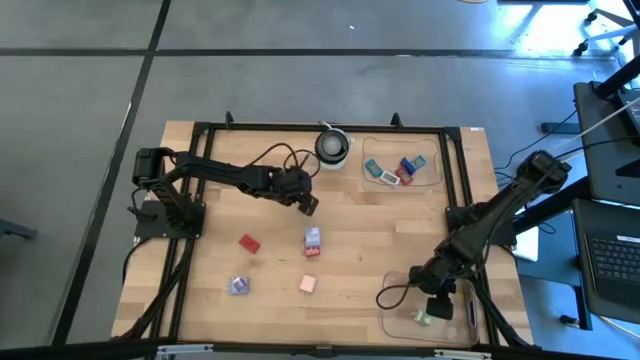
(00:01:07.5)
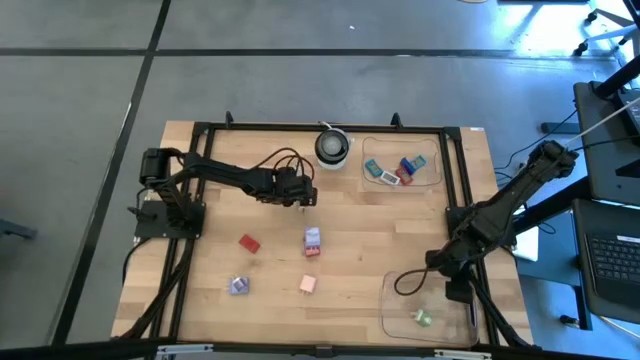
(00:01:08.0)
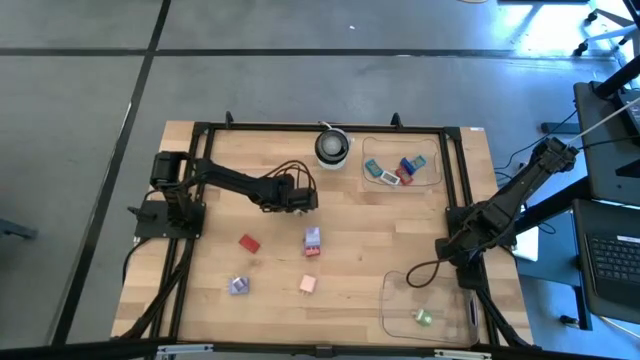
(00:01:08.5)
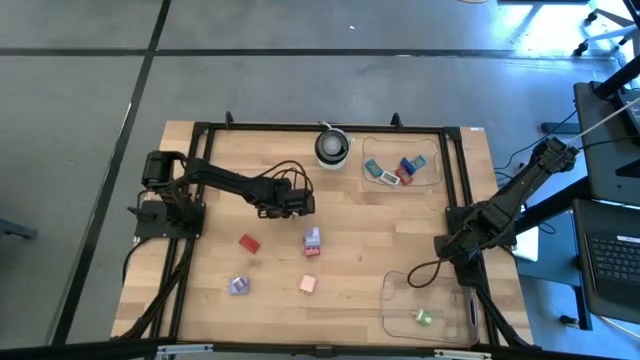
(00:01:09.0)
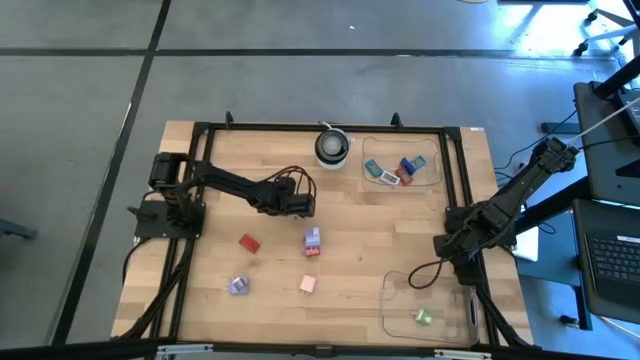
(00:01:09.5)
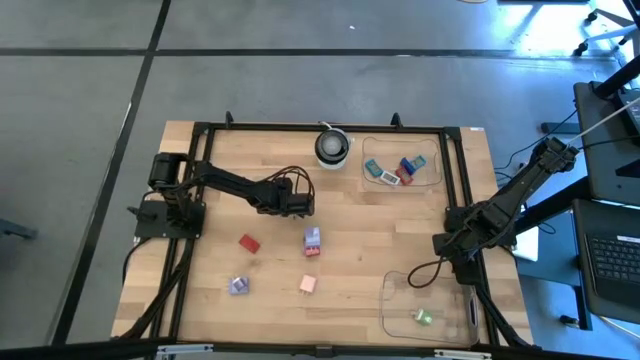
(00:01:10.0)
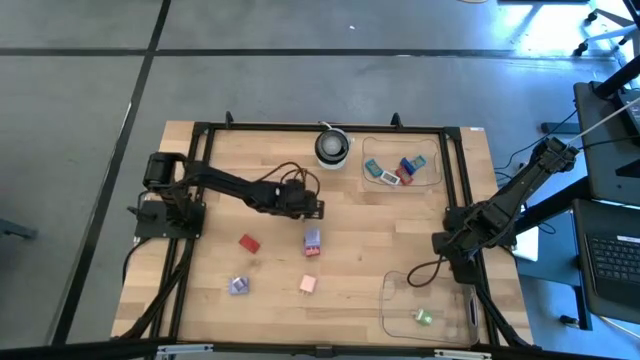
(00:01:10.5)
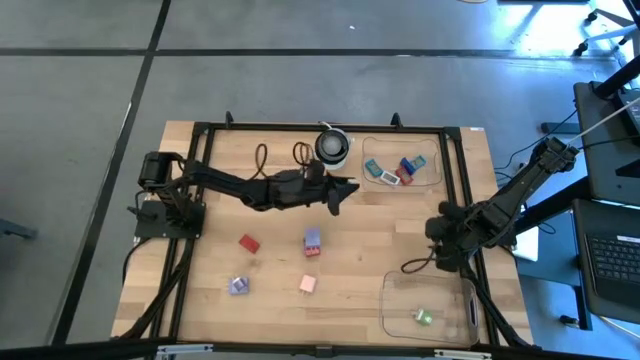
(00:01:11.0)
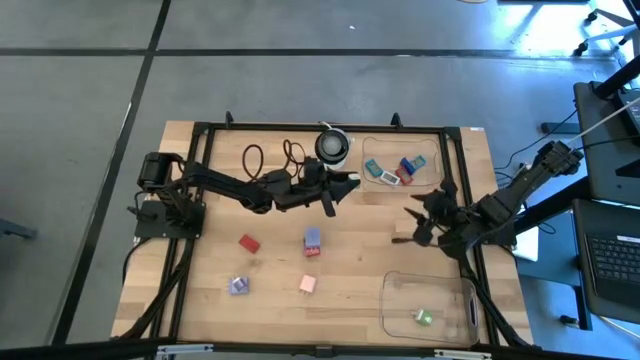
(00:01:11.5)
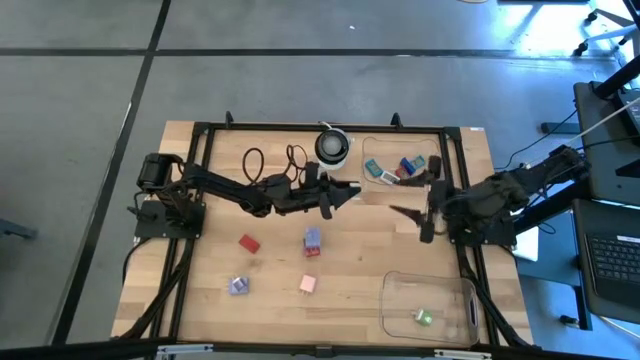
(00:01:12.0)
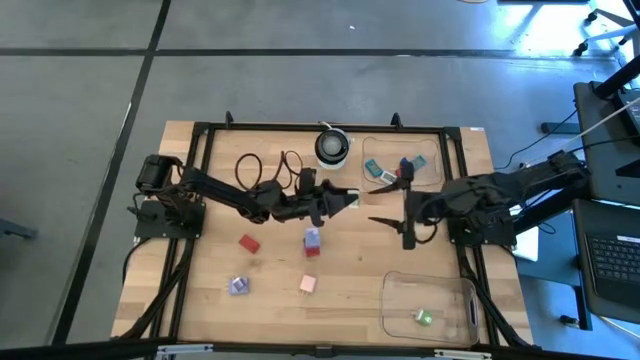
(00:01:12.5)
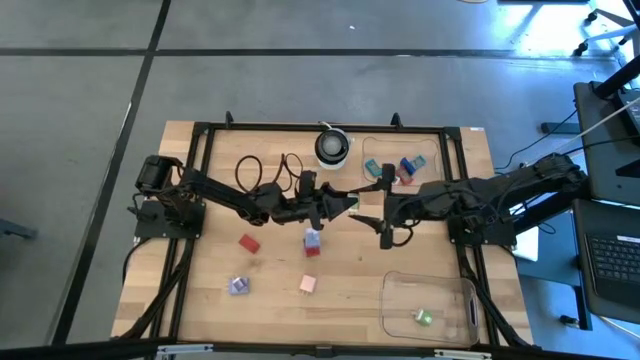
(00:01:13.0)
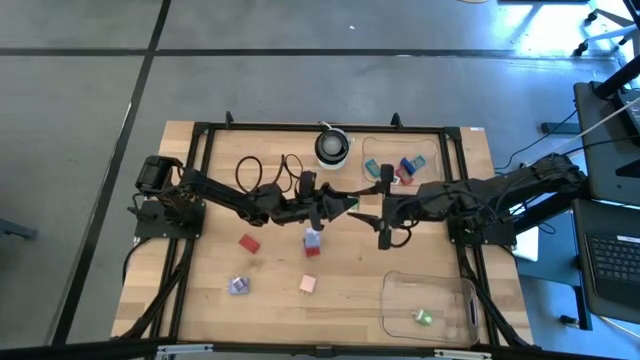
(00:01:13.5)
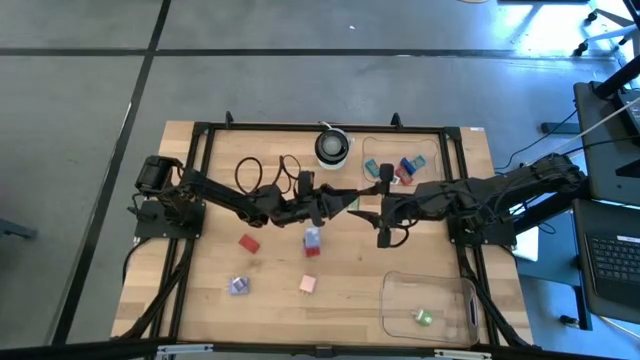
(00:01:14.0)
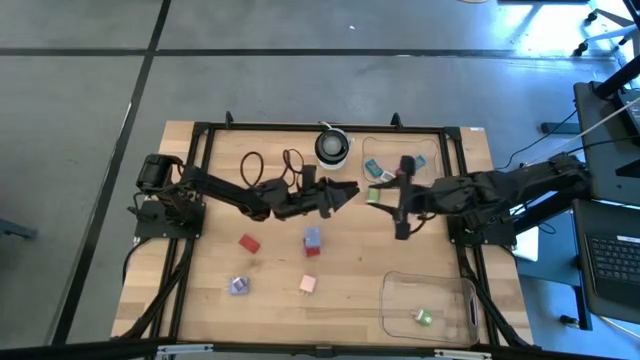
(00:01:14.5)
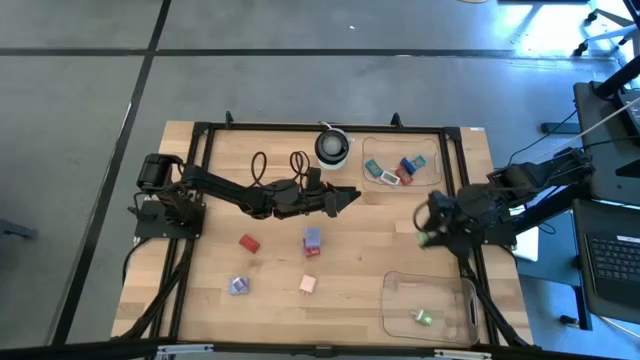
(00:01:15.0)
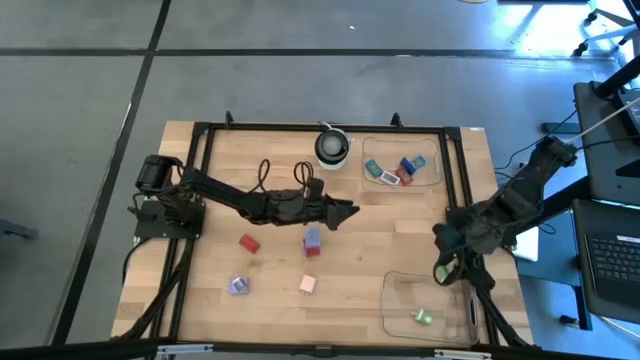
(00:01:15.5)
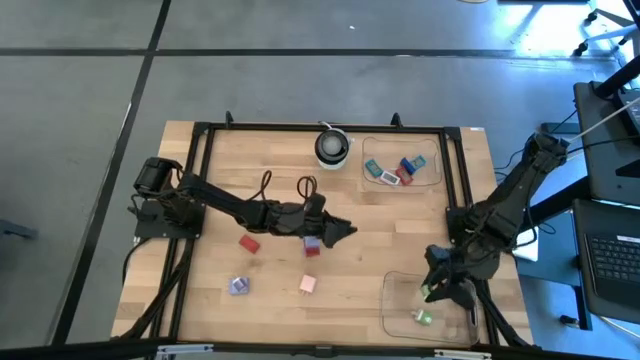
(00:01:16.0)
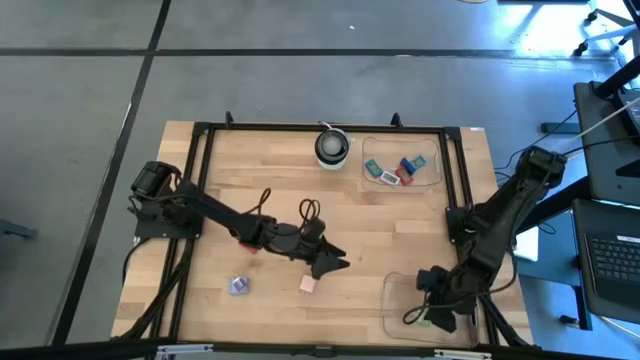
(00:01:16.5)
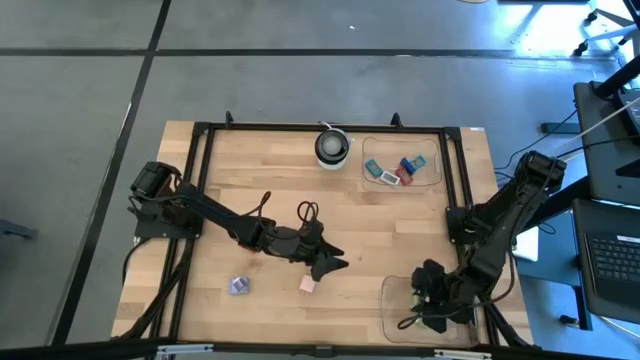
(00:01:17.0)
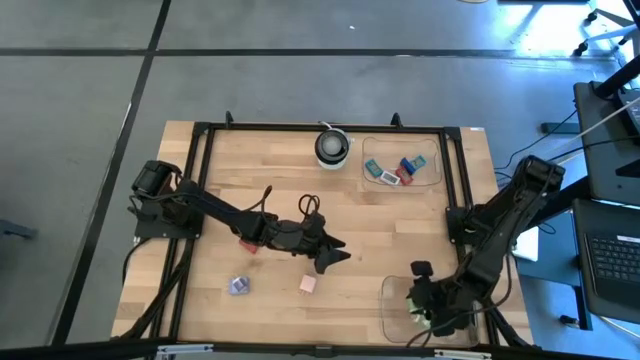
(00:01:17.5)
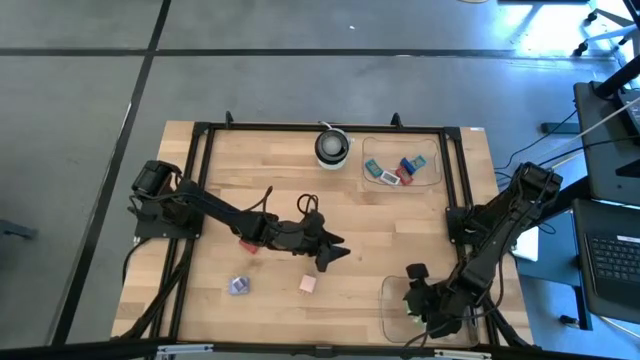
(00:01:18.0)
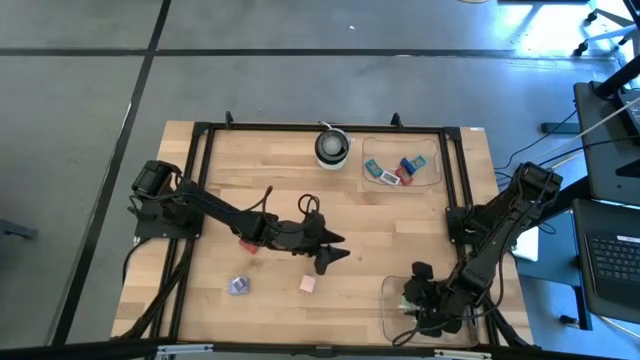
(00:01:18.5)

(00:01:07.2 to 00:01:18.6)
Task: Pick & Place Office items
Put the green charger adapter into the bottom transparent bin

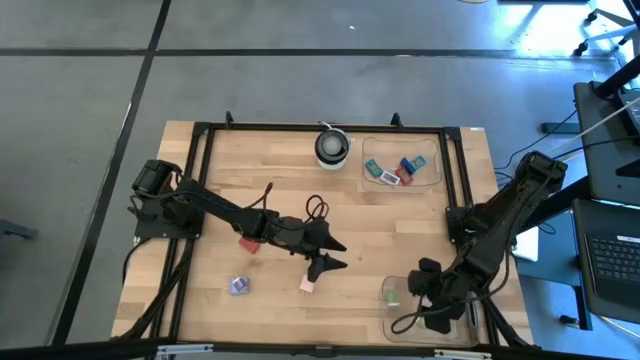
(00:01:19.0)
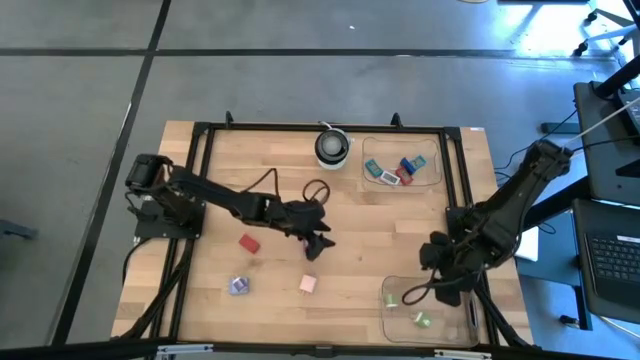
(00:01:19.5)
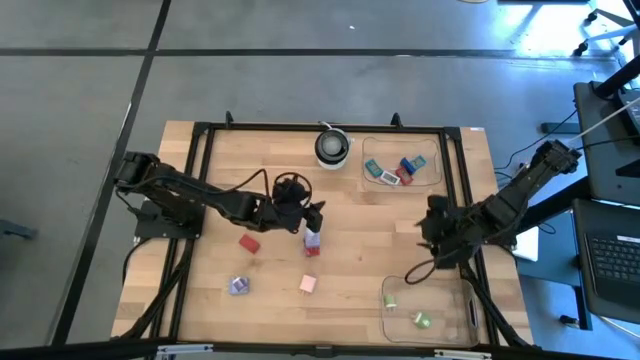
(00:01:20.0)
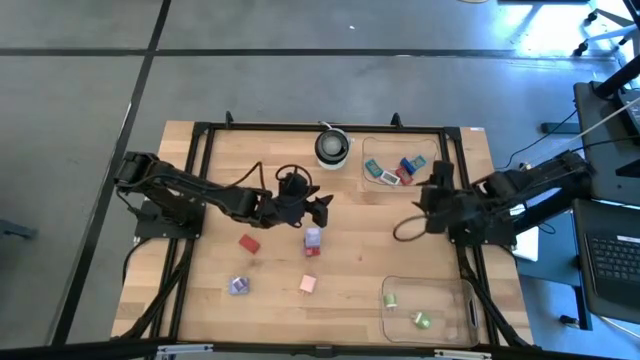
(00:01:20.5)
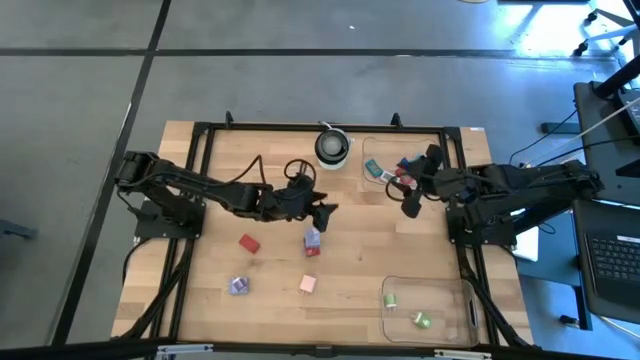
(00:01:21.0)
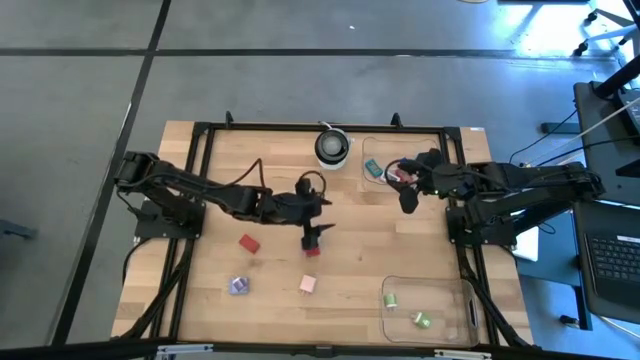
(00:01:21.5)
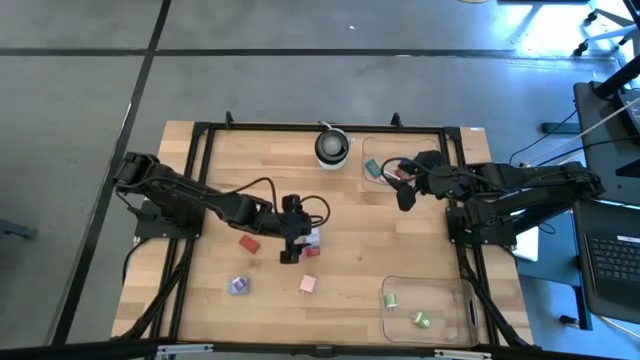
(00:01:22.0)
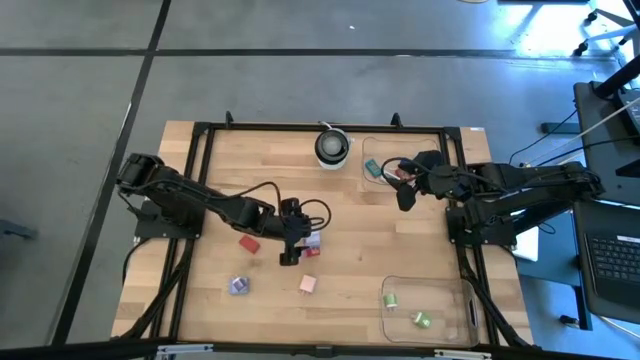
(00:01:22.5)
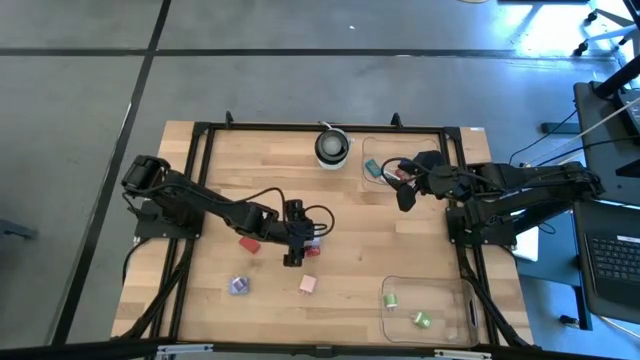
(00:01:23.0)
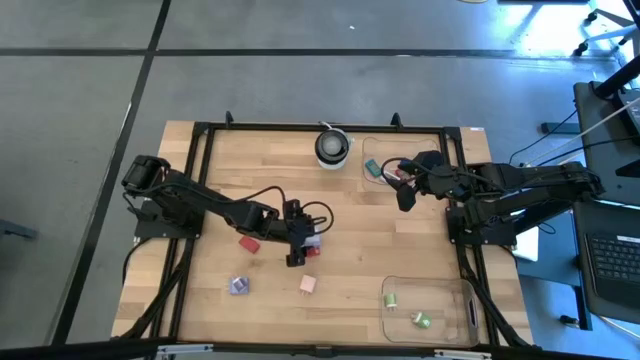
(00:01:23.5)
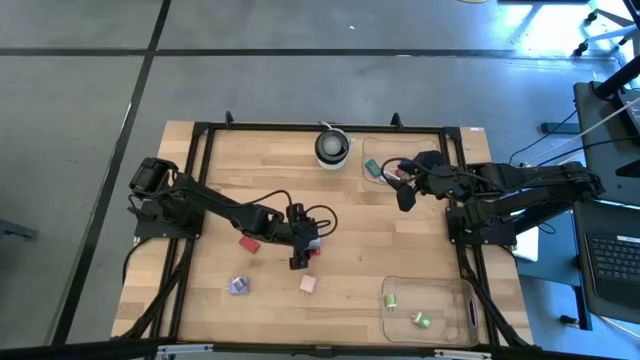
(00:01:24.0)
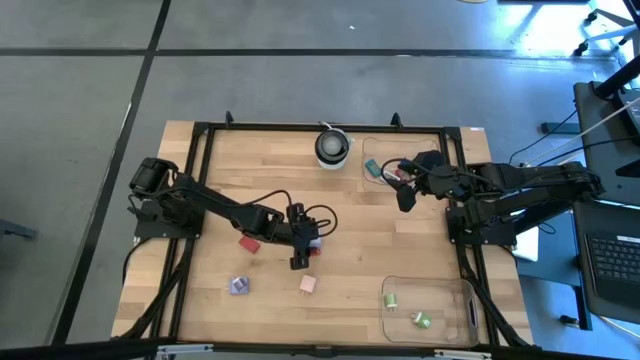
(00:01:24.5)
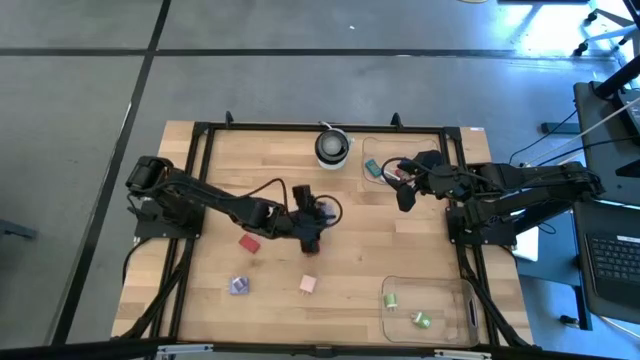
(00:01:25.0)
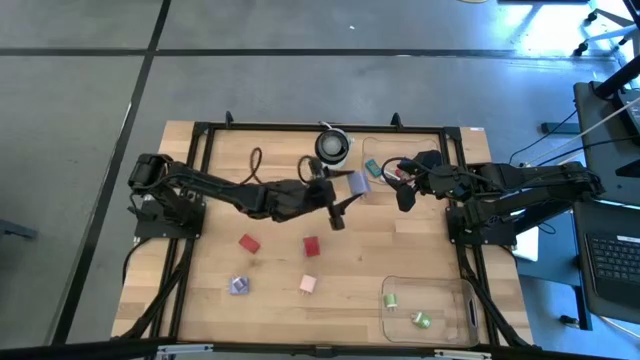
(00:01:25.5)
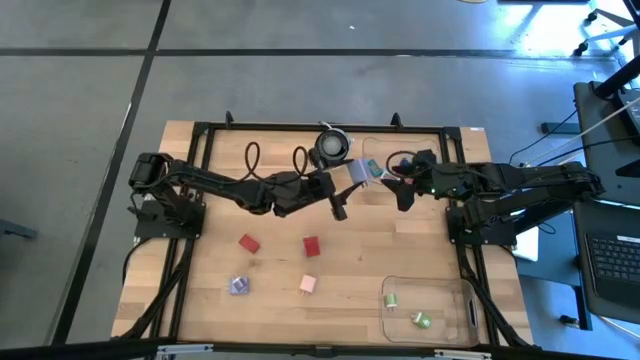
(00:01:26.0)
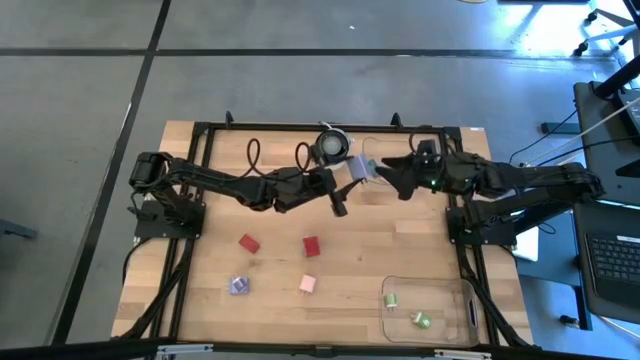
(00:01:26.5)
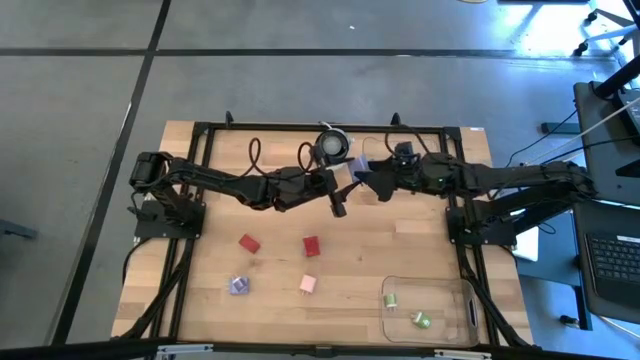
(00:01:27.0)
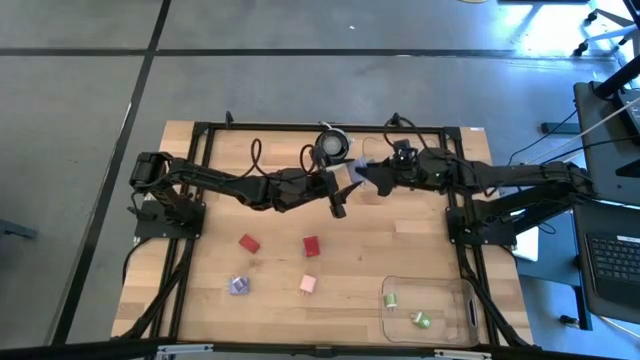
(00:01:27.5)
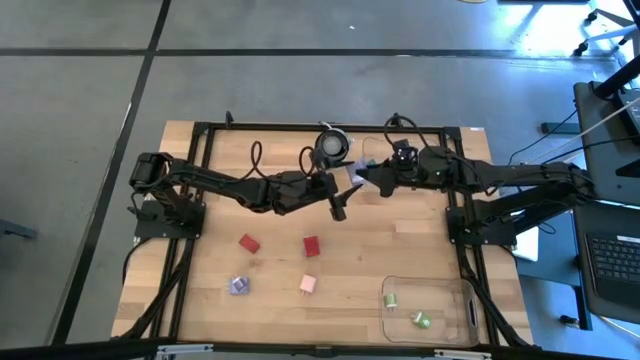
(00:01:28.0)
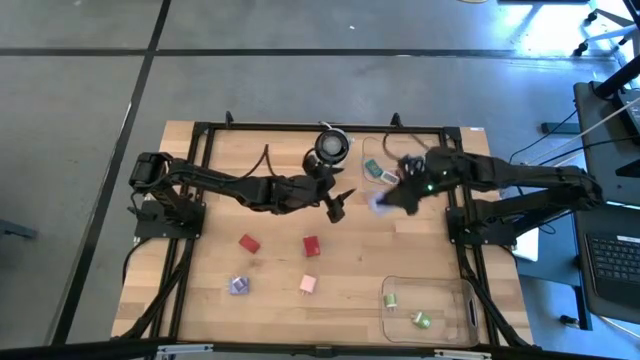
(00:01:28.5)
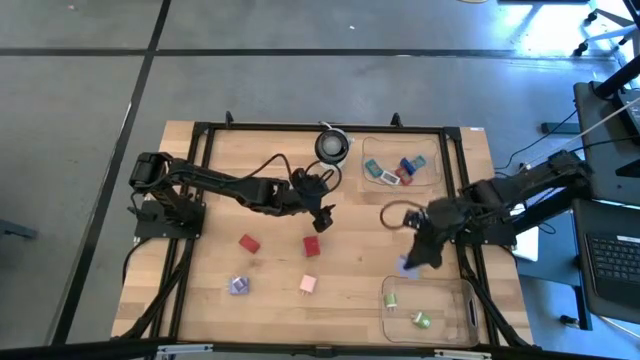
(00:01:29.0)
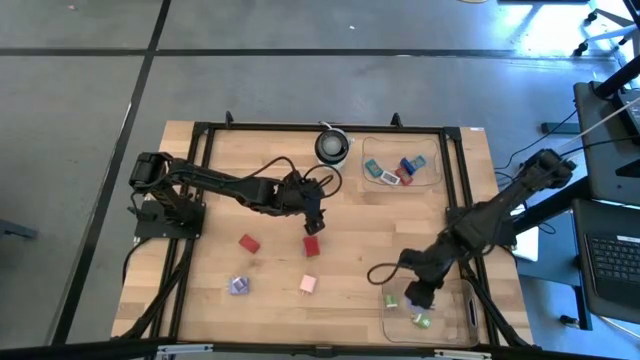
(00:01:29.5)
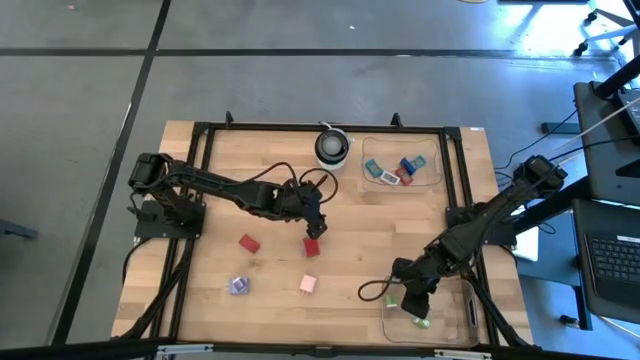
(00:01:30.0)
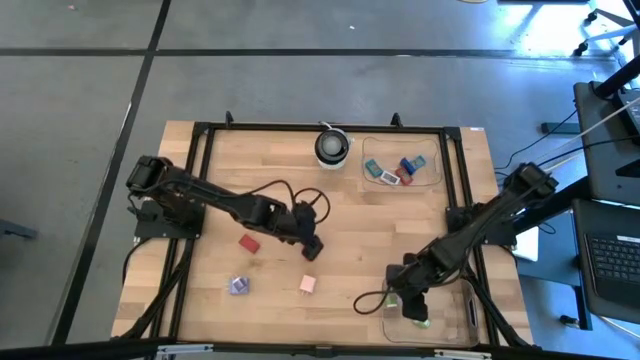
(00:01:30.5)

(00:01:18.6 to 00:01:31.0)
Put the top light blue charger adapter into the bottom transparent bin
